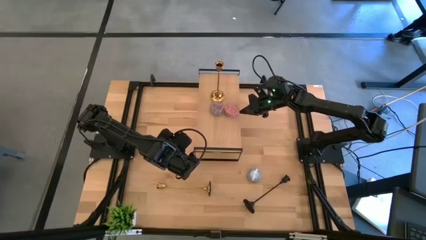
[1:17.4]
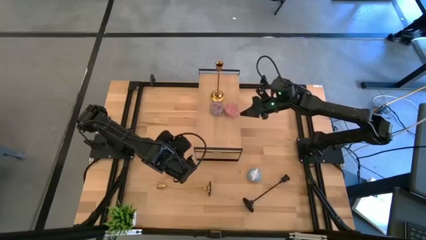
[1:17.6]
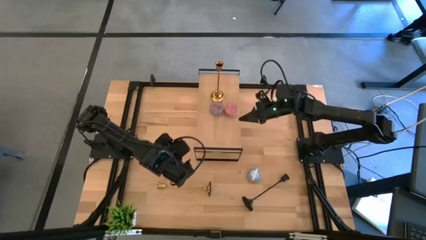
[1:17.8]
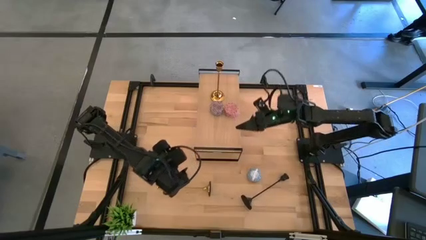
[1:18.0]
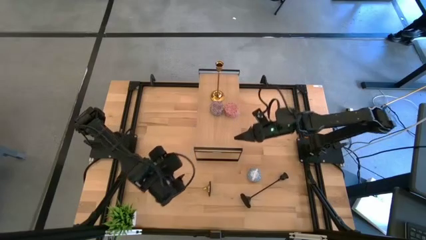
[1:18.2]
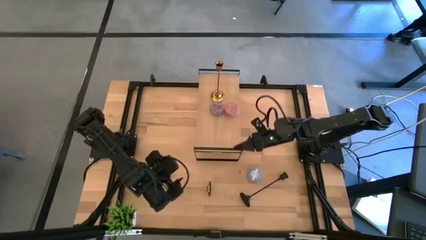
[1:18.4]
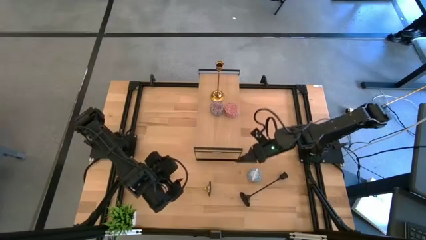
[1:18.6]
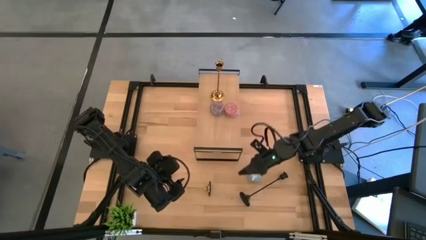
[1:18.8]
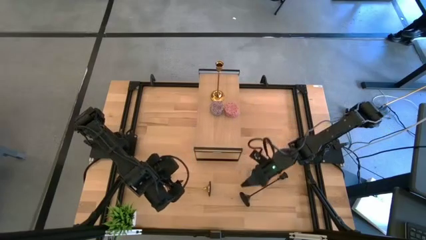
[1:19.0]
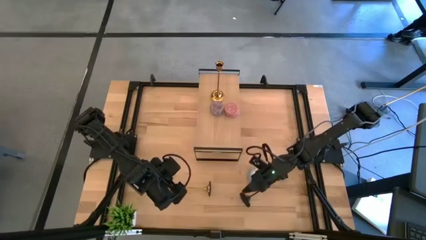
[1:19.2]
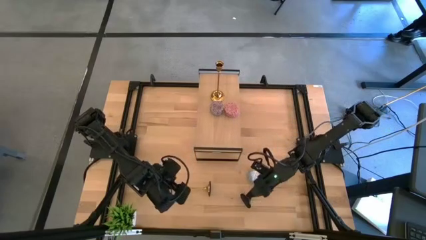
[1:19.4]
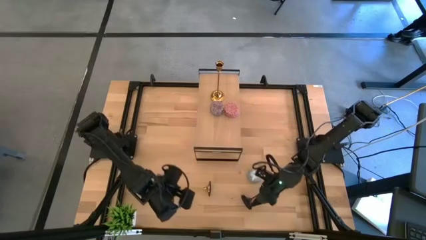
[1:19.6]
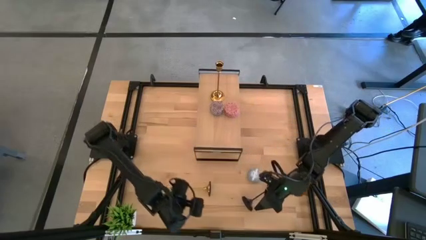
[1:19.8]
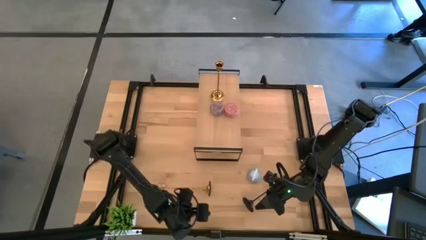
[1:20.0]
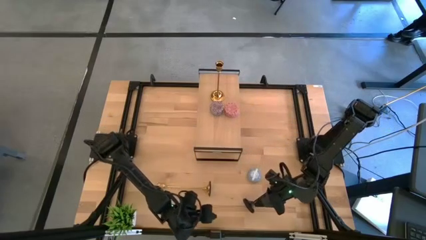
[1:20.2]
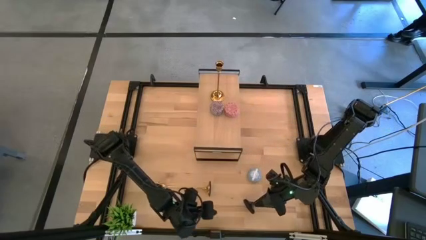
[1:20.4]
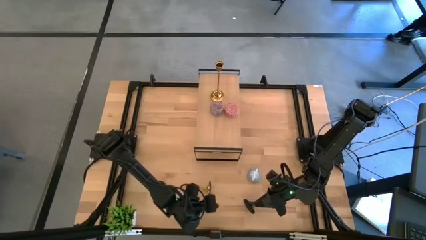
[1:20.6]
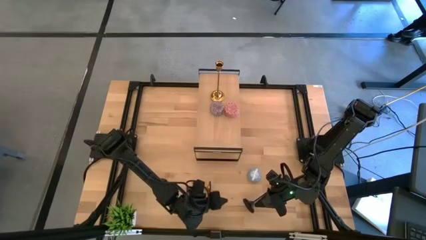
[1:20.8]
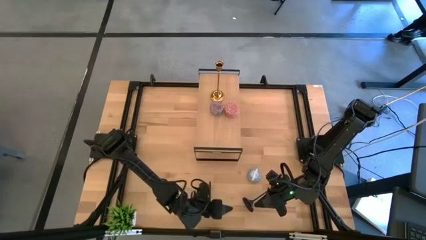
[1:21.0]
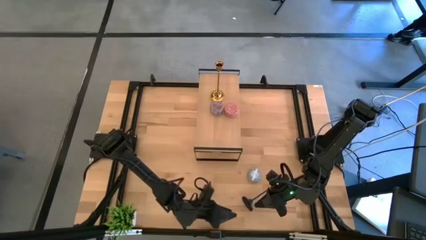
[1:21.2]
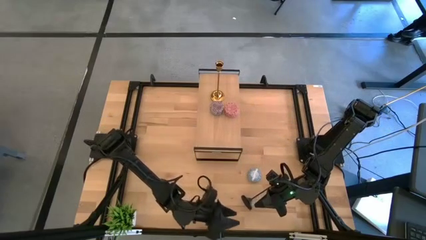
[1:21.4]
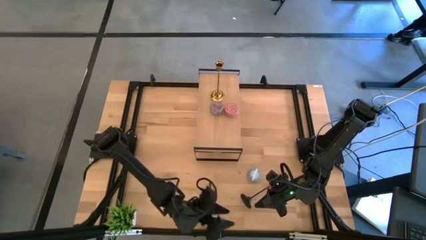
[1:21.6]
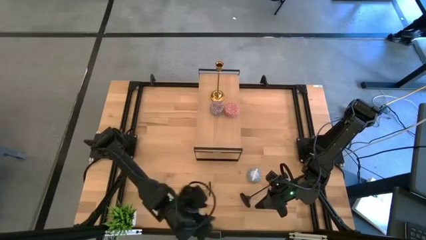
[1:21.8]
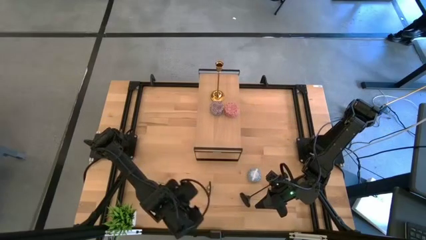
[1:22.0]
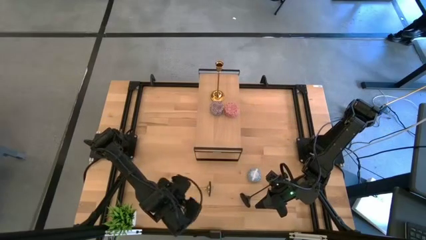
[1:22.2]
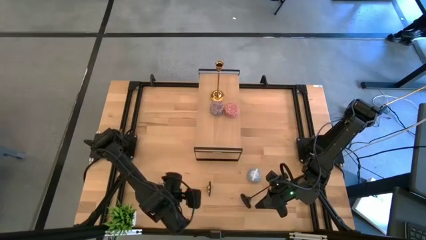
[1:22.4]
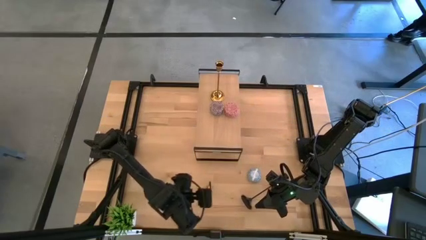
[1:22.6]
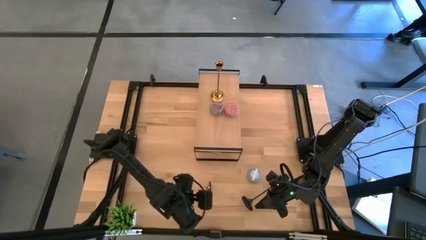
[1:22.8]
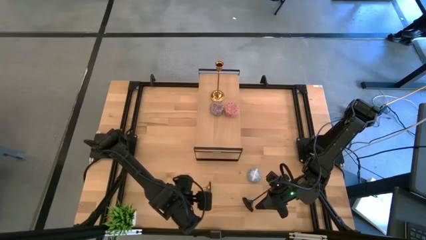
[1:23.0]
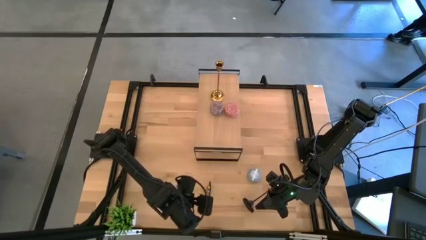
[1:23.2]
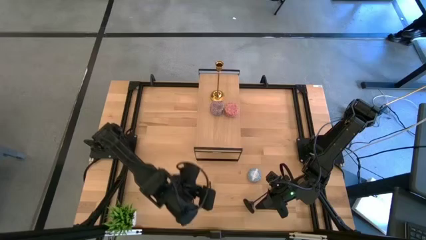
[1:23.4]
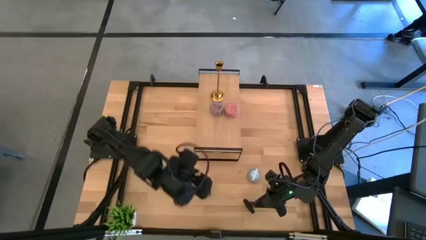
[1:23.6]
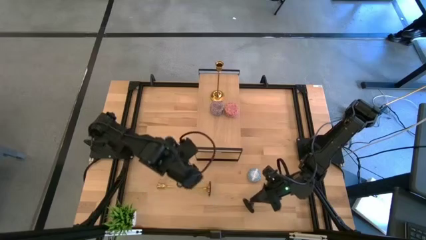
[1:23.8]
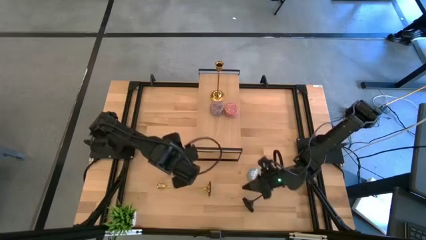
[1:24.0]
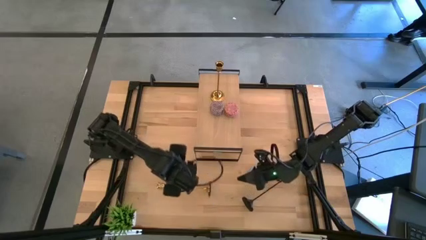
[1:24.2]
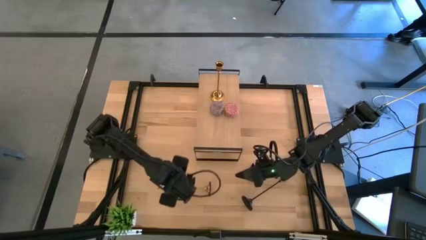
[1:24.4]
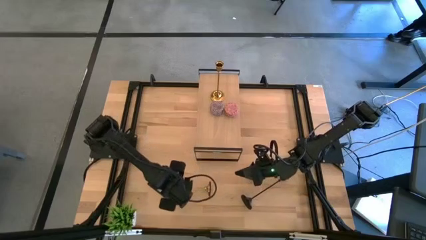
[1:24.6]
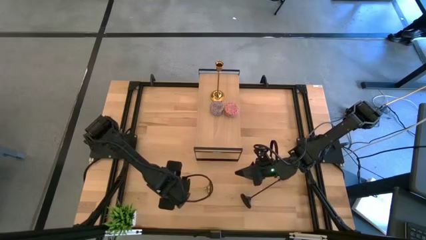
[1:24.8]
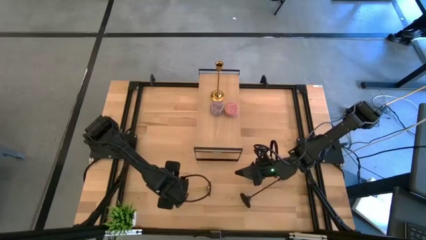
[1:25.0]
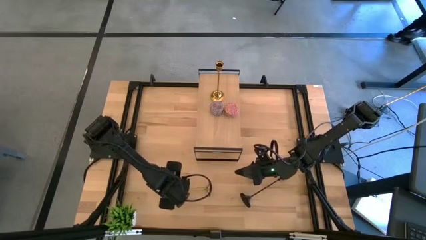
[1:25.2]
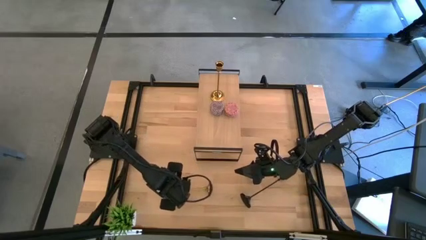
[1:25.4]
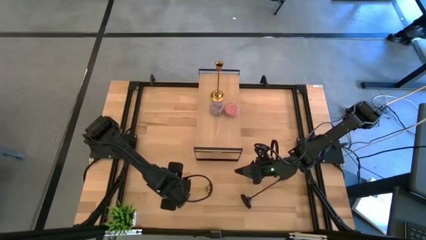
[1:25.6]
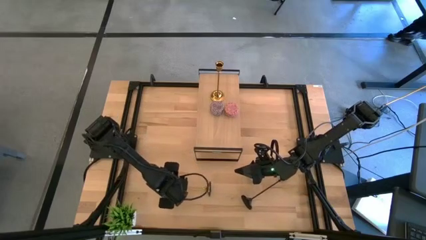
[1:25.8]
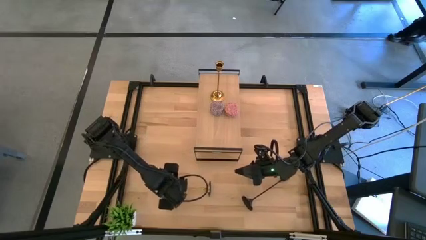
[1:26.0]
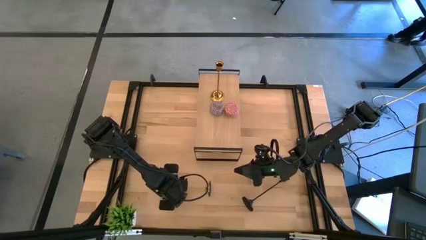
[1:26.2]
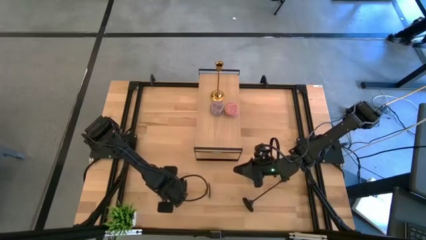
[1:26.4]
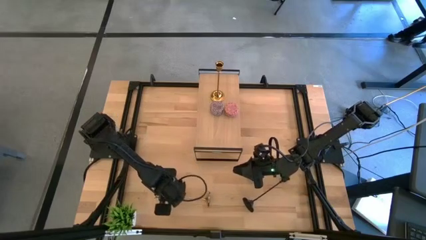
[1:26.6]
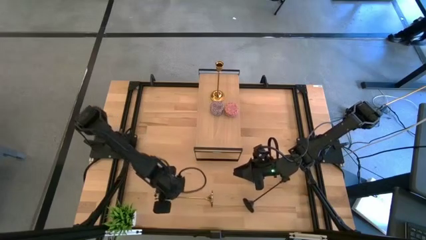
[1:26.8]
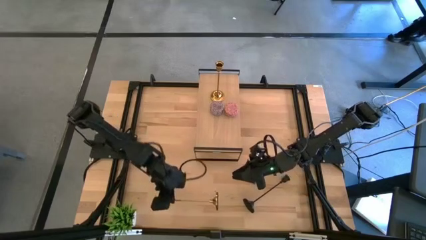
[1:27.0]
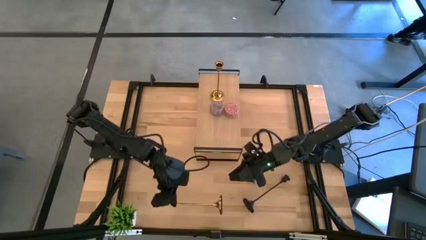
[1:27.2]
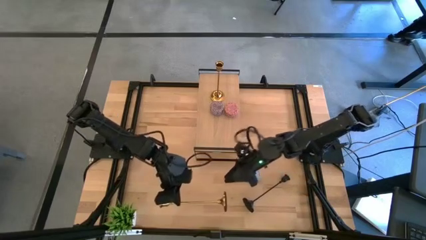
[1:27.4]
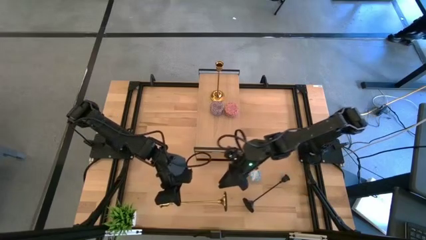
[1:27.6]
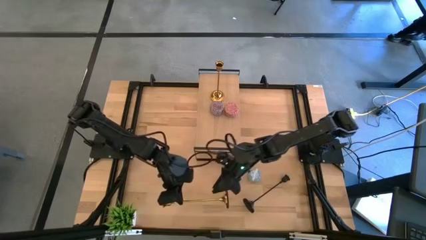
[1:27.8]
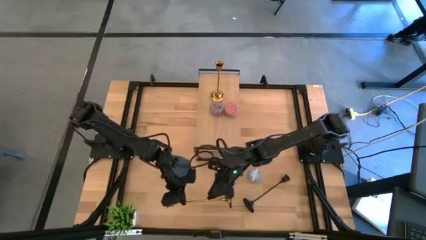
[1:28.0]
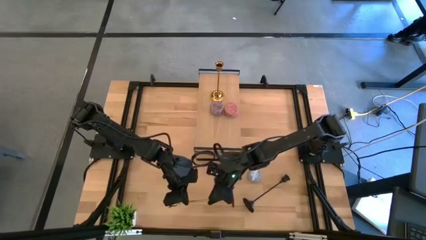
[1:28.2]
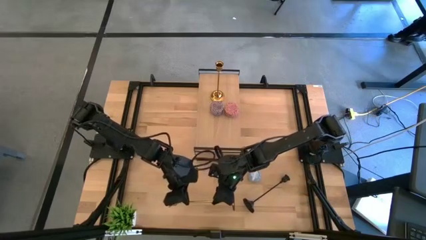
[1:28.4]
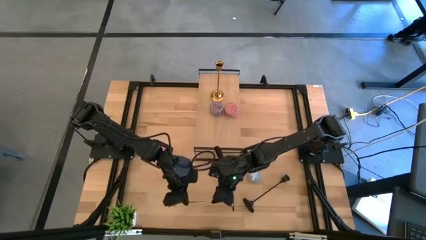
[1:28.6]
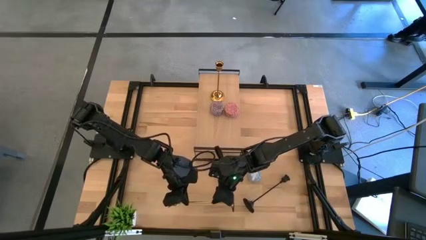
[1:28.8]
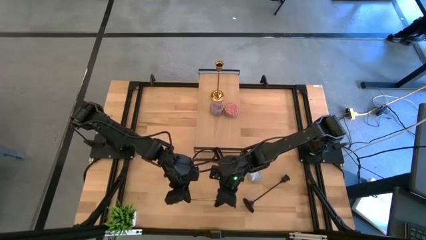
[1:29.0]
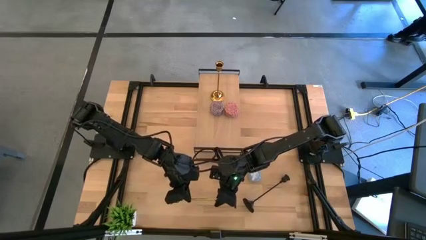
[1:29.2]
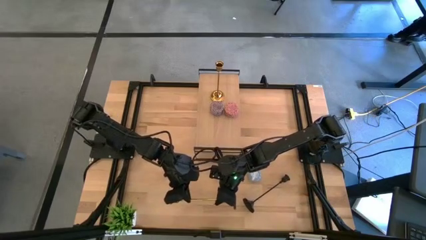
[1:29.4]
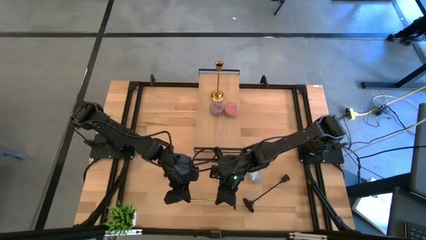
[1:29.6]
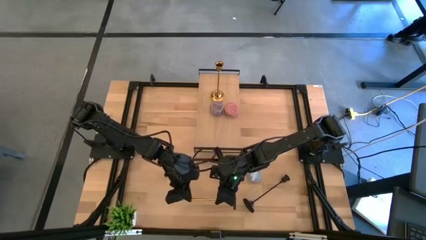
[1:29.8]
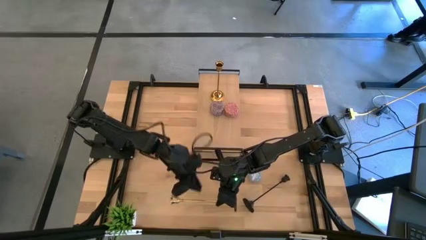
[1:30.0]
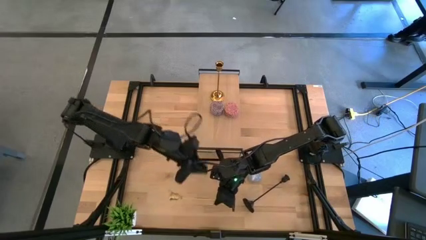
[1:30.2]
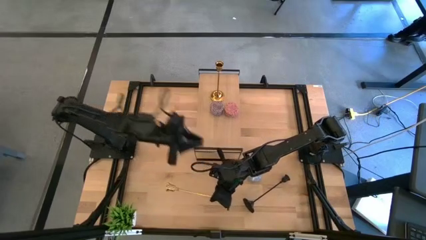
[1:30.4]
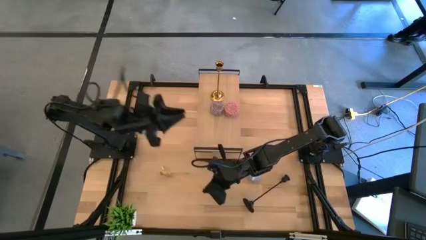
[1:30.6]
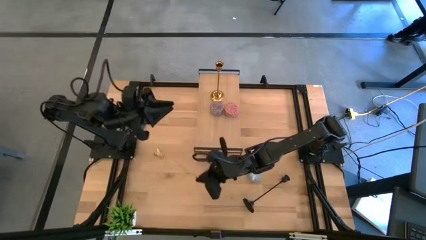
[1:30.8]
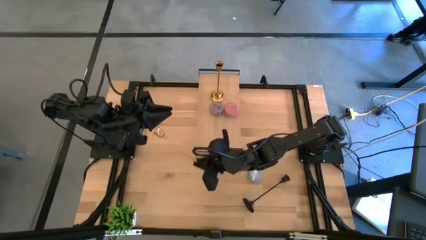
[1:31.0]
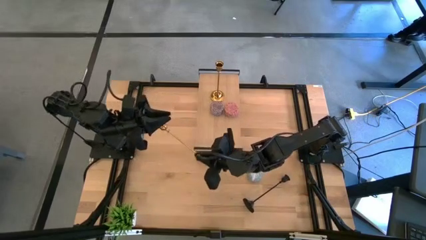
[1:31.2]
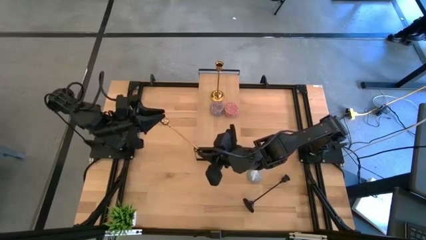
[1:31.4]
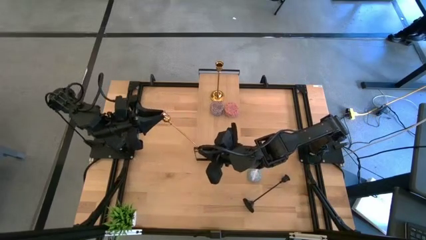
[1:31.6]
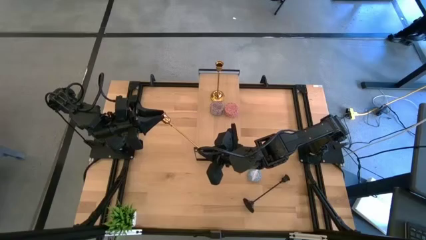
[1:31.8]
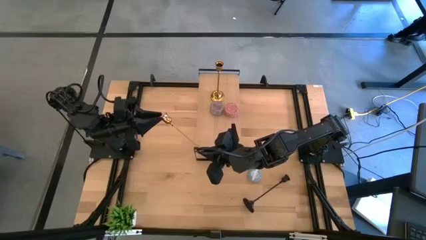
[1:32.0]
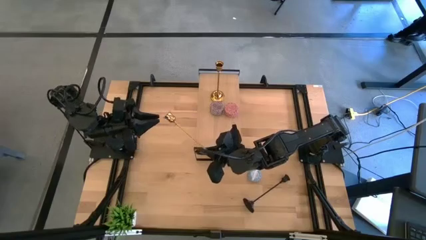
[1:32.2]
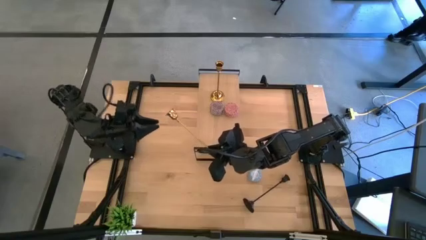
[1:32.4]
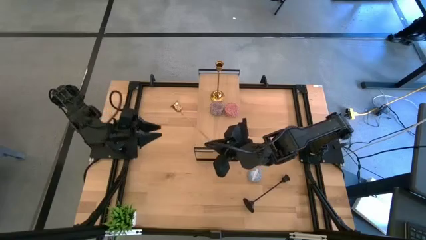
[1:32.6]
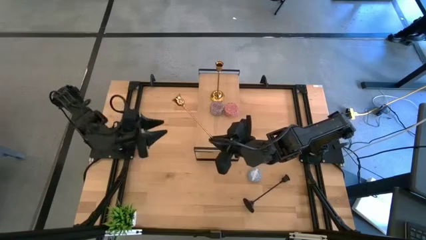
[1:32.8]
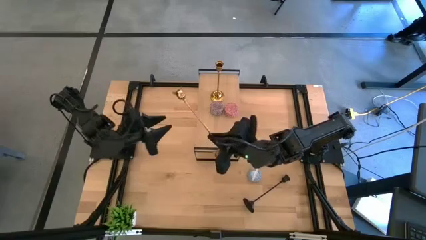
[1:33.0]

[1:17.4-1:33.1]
Task: Pick & Place candle stick holders
Put the gold candle holder on the shelf
